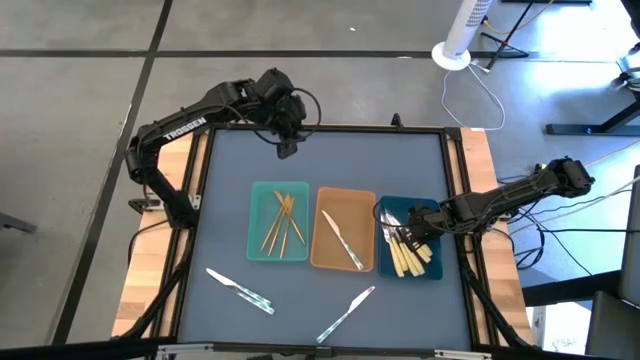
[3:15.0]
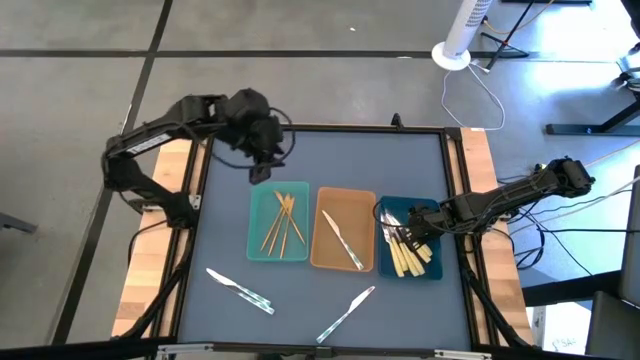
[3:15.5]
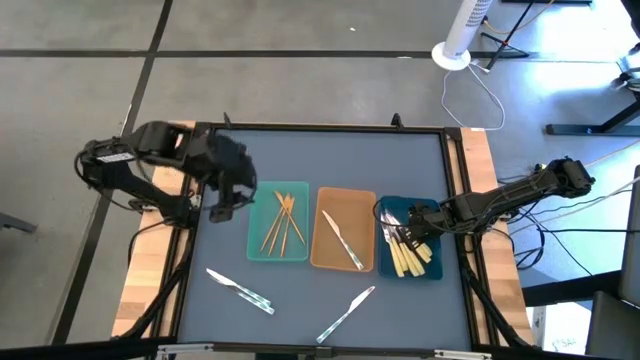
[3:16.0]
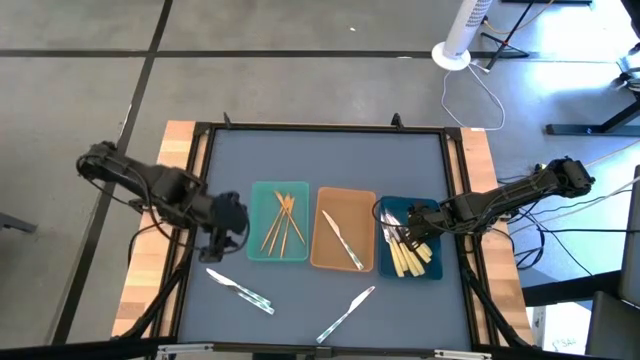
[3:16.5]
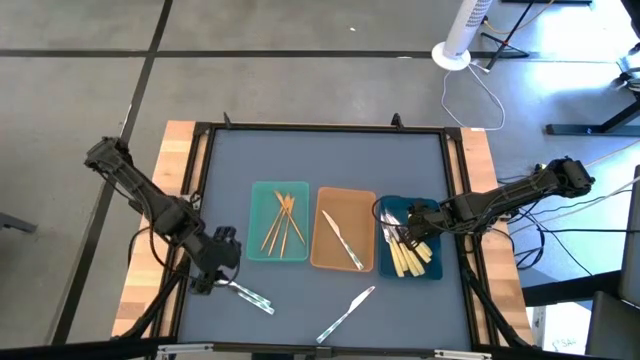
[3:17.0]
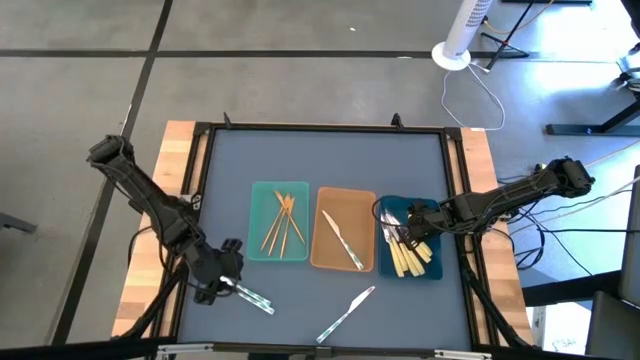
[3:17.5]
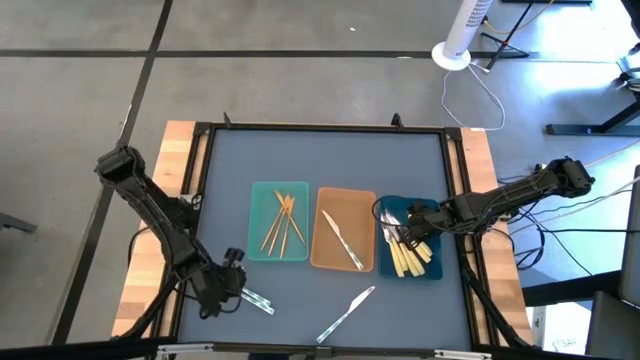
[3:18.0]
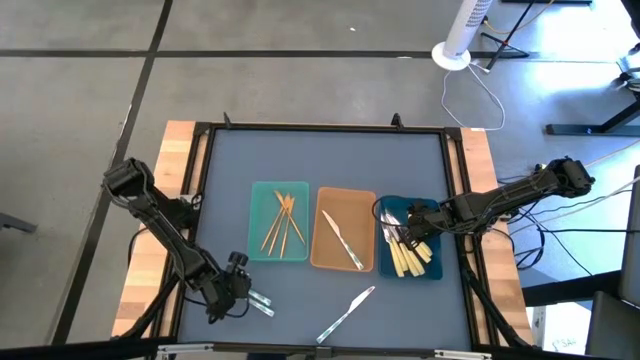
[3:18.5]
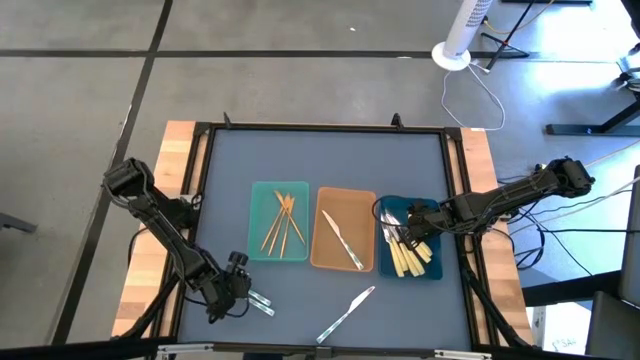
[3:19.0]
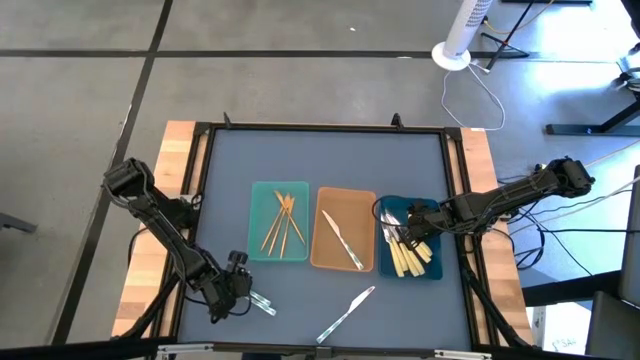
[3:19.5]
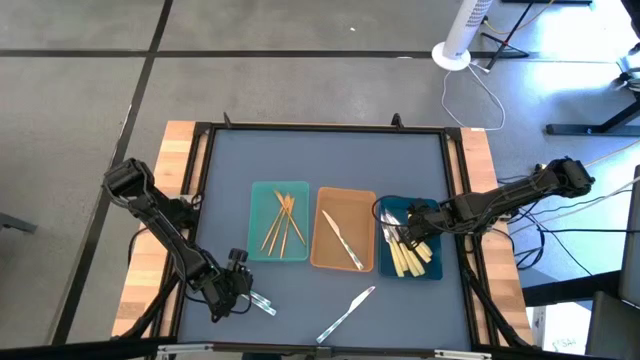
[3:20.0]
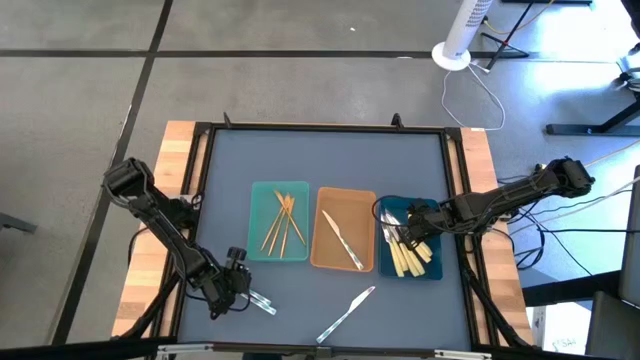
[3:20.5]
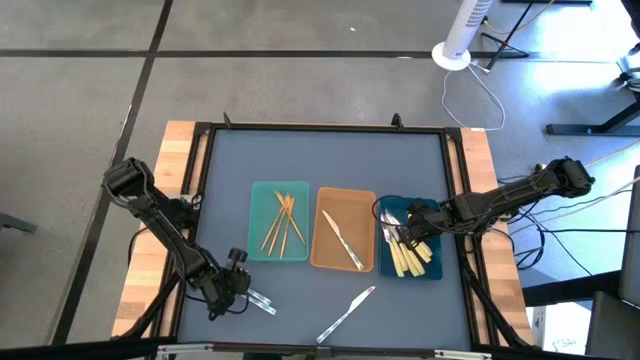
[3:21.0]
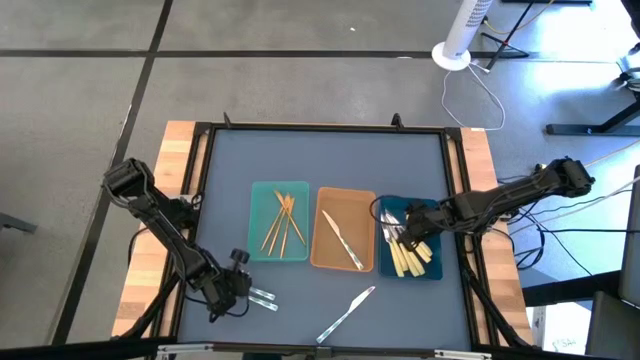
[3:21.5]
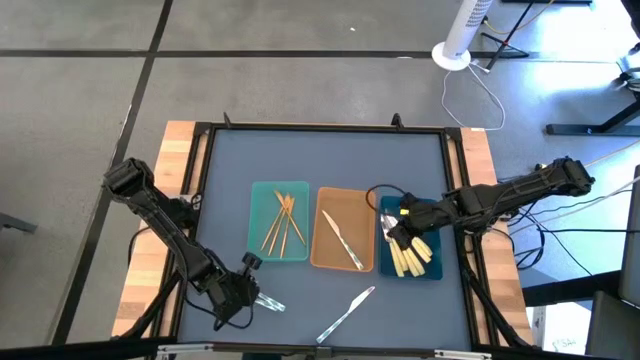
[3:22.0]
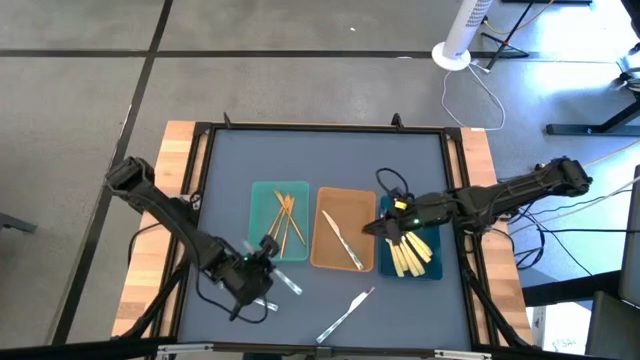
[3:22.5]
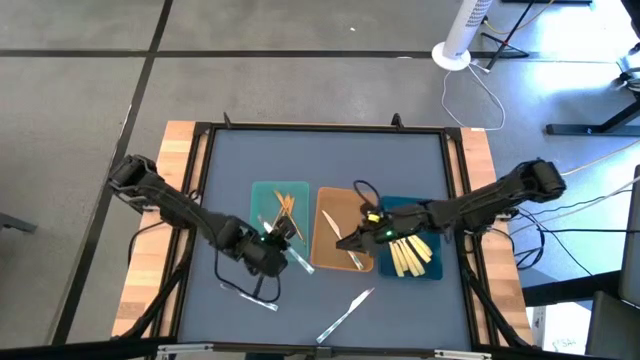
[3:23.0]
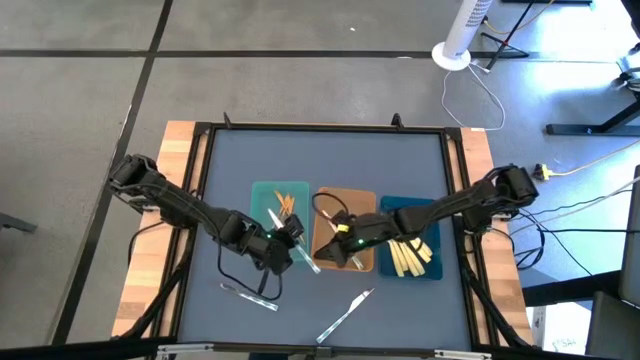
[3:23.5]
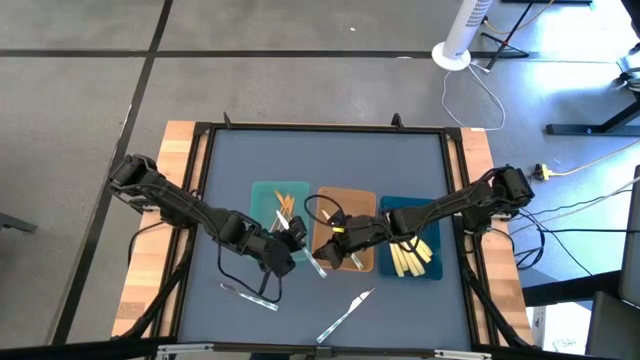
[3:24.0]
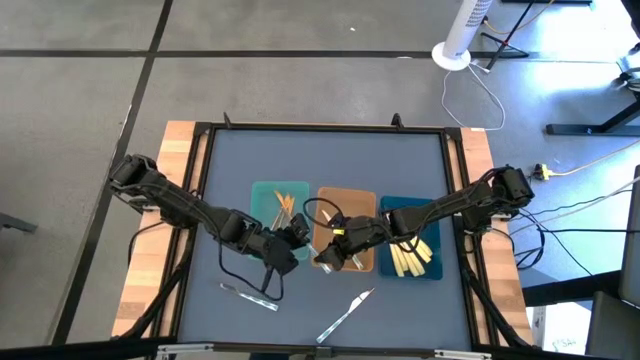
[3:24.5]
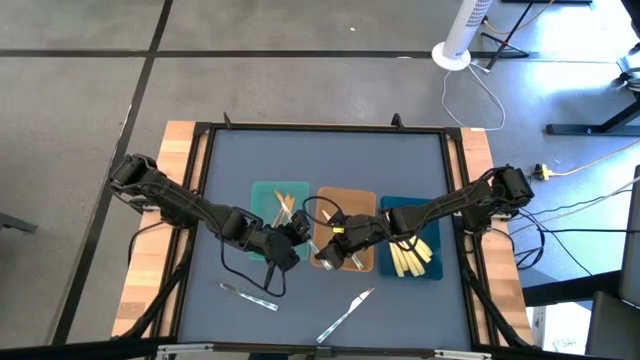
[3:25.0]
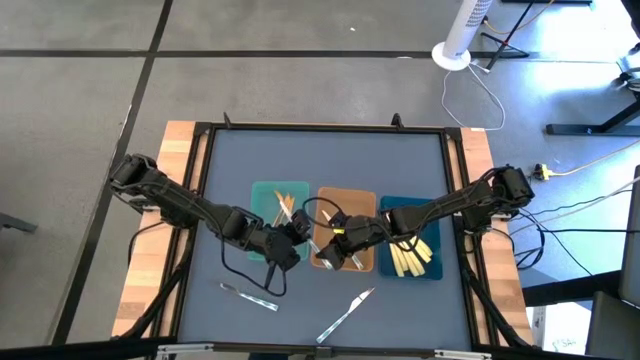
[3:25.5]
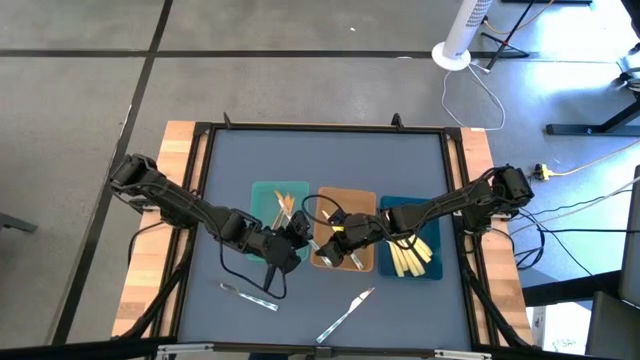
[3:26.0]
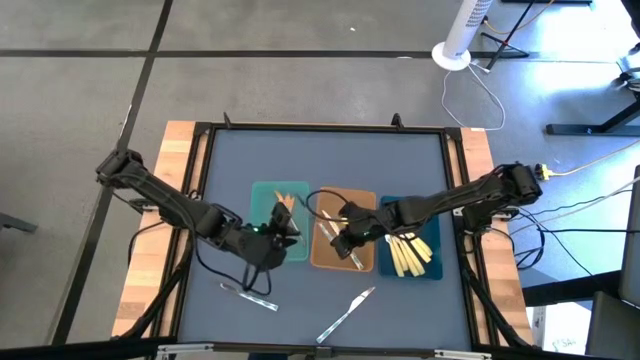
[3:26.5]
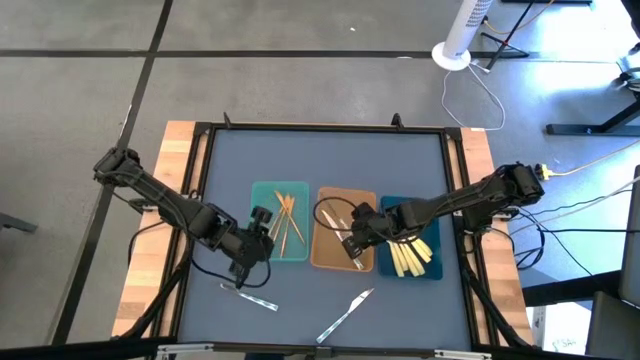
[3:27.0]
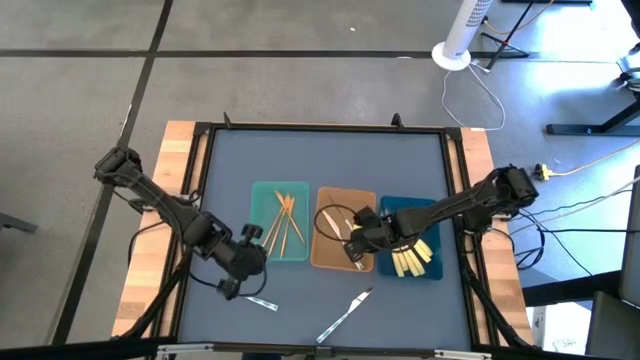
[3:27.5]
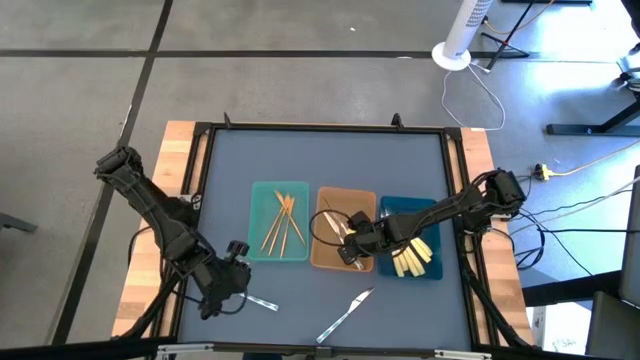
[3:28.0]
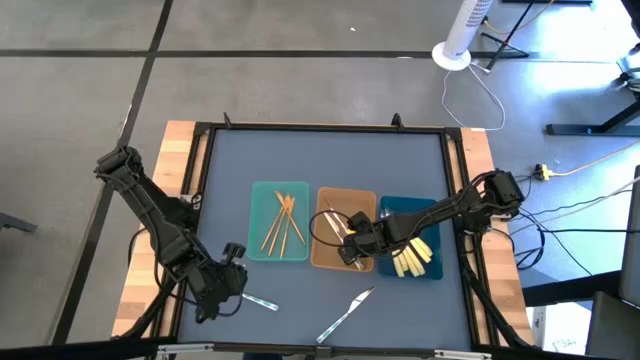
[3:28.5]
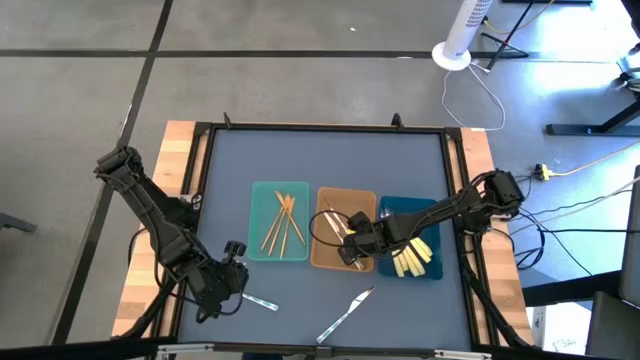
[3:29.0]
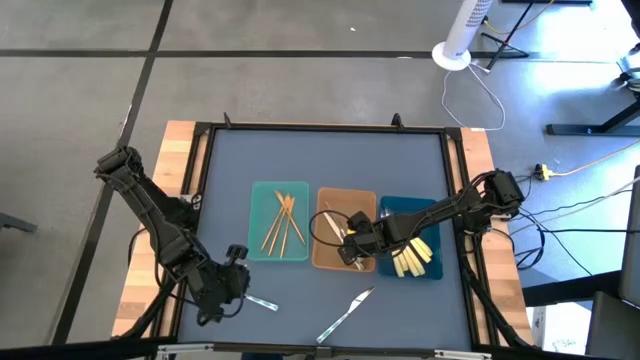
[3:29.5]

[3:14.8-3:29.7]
Task: Sort silverware by color (type)
Put the blue knife into the orange bin

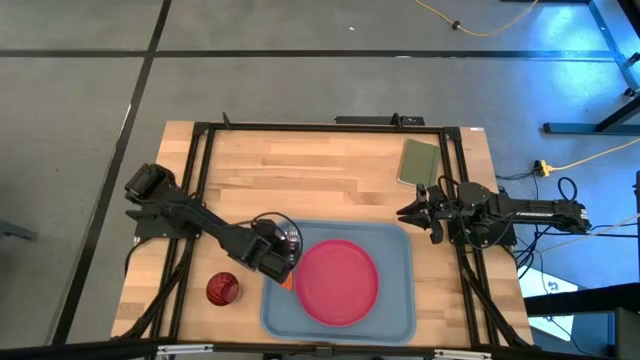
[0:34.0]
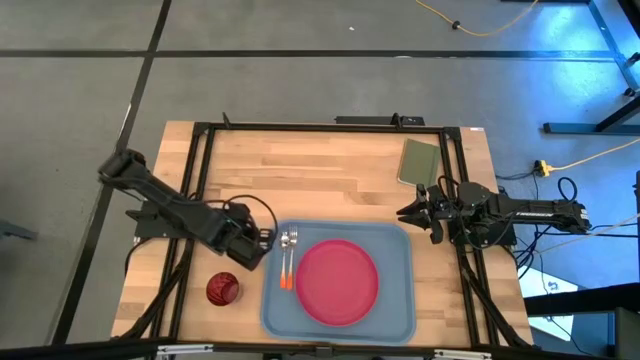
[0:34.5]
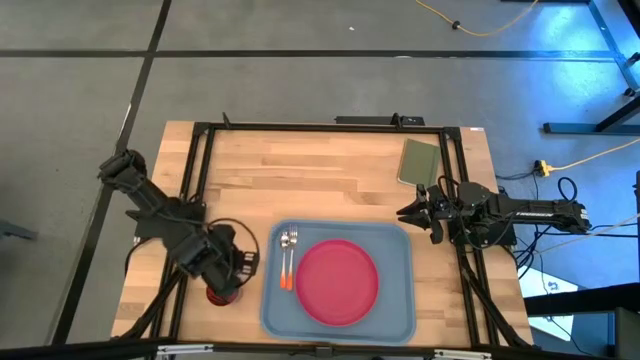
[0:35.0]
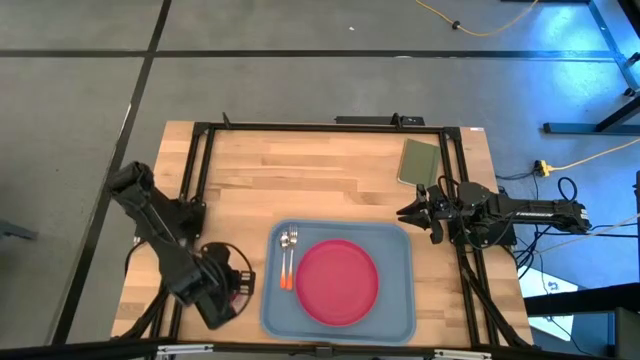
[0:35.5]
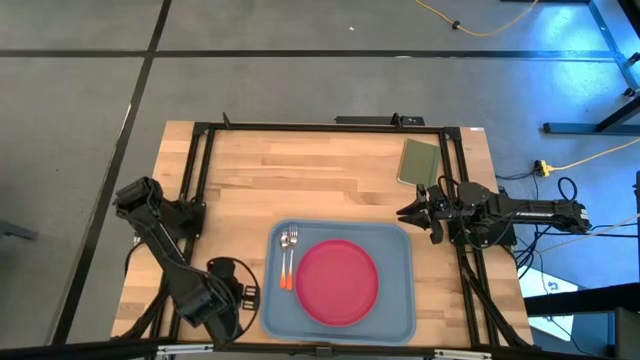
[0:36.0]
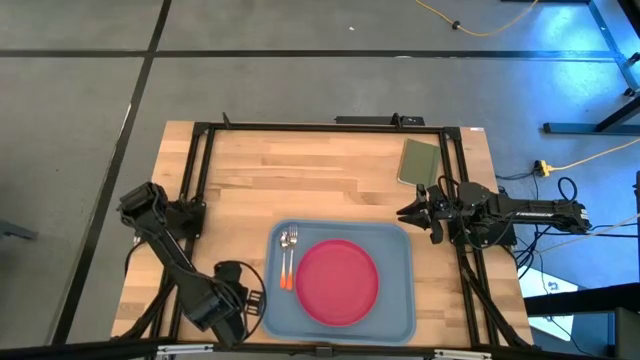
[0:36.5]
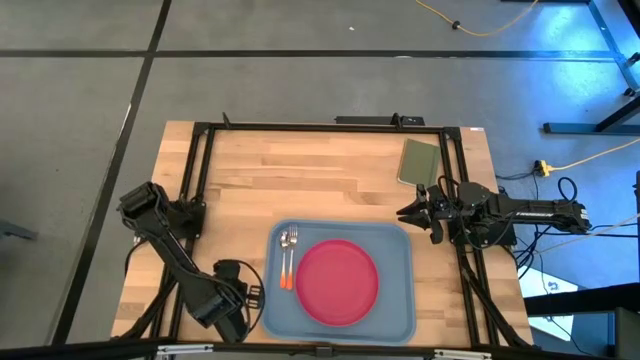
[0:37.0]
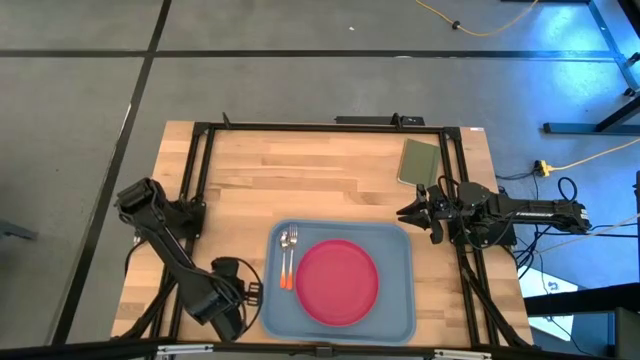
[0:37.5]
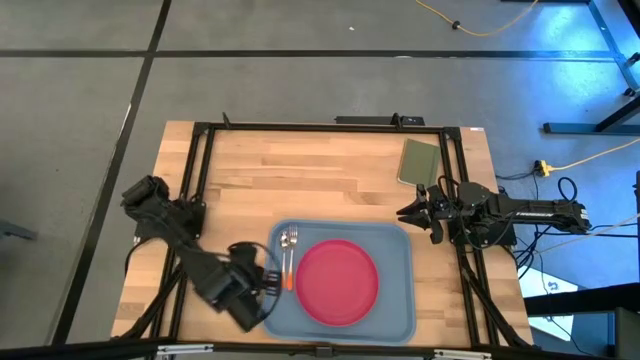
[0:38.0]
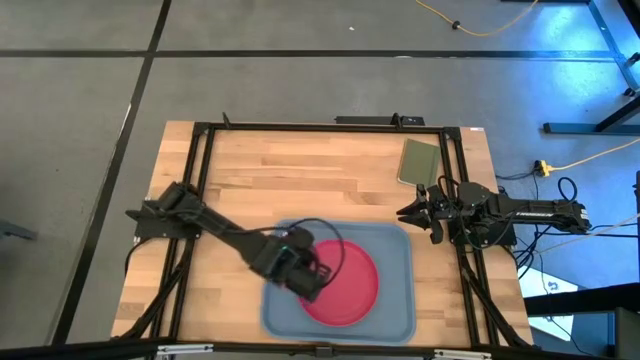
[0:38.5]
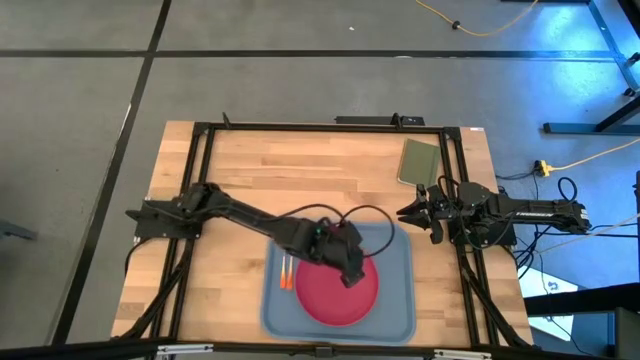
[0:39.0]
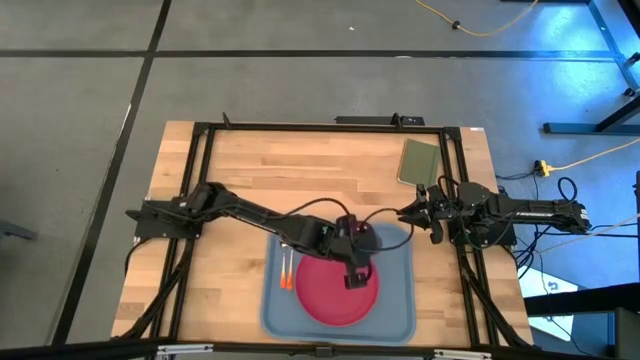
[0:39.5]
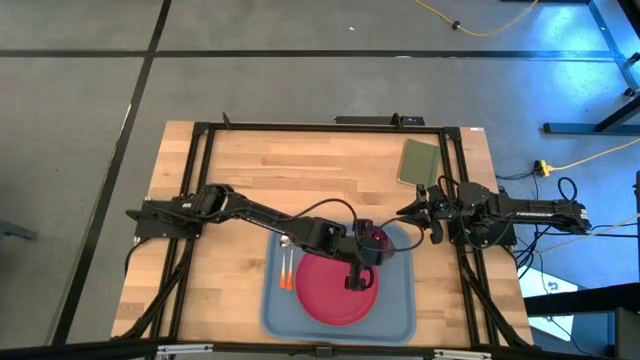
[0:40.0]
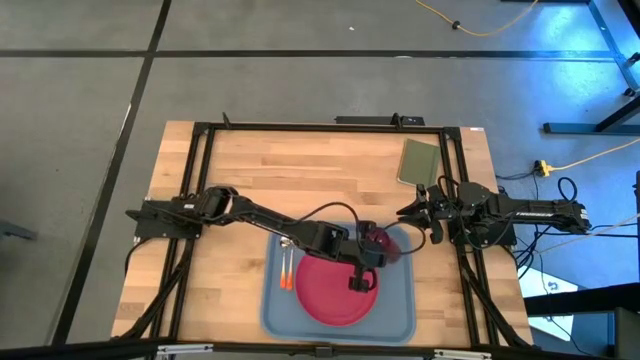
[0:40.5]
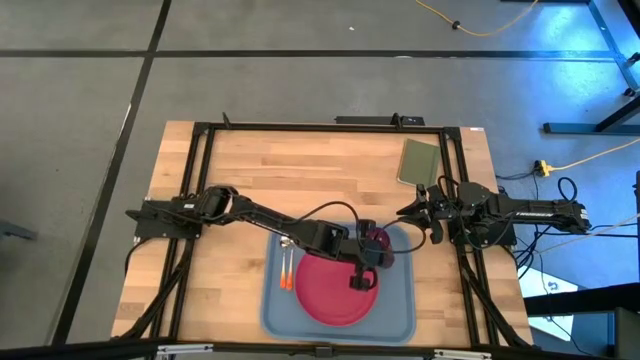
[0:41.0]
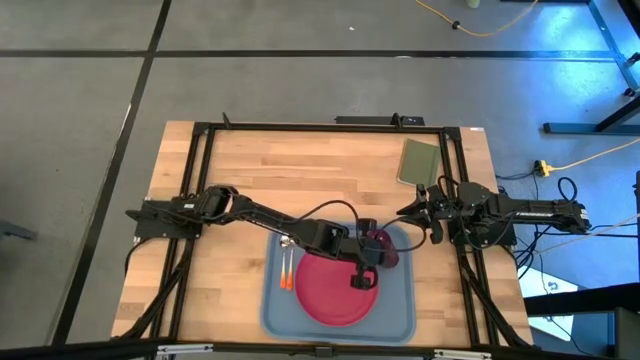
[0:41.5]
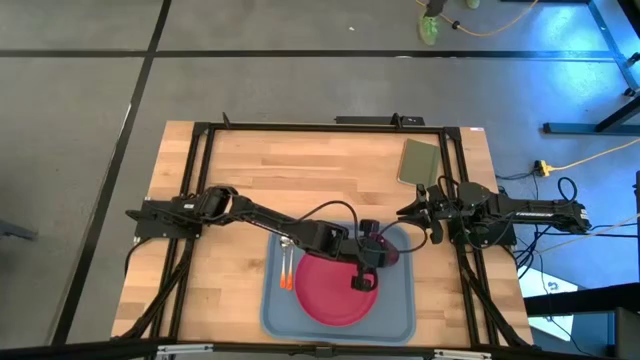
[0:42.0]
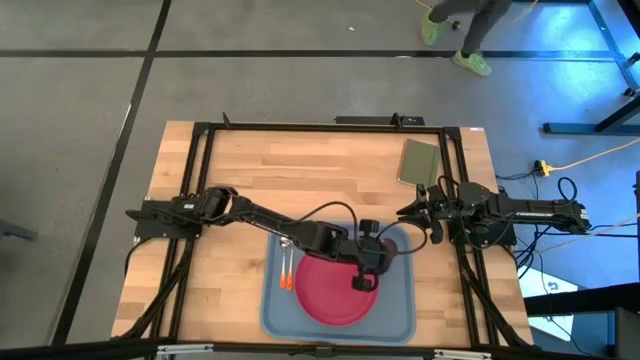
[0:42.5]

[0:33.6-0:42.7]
Task: Pick and place plate/cup/fork/spoon on tray
Put the red cup on the right of the blue tray
